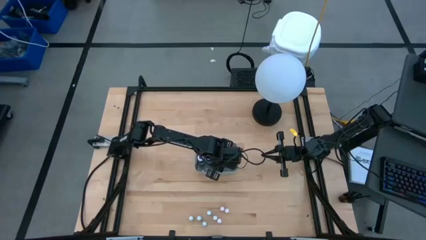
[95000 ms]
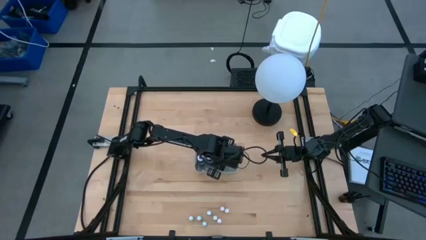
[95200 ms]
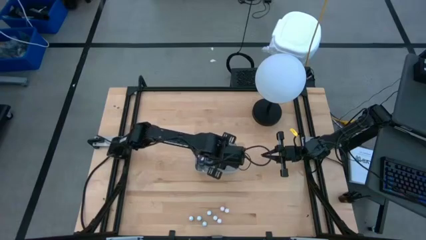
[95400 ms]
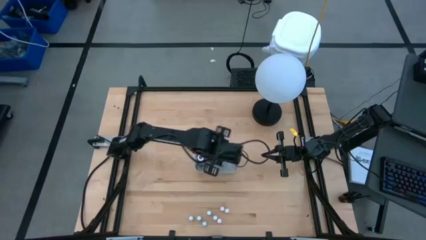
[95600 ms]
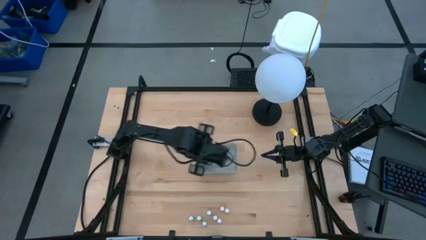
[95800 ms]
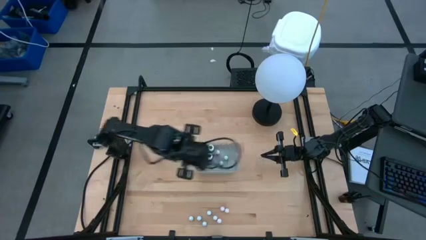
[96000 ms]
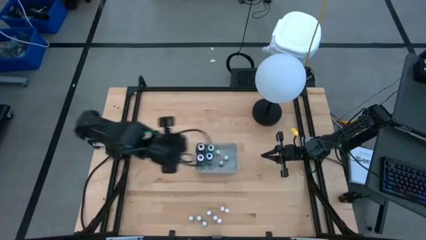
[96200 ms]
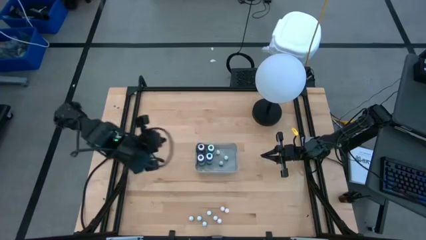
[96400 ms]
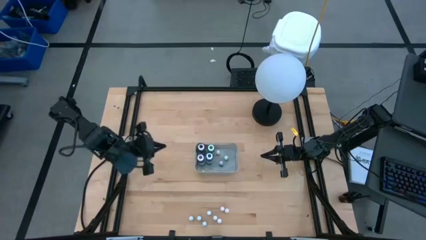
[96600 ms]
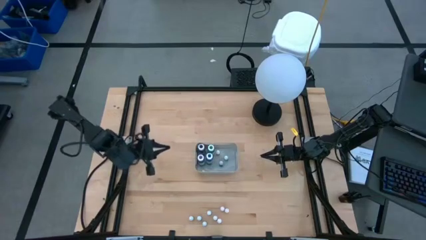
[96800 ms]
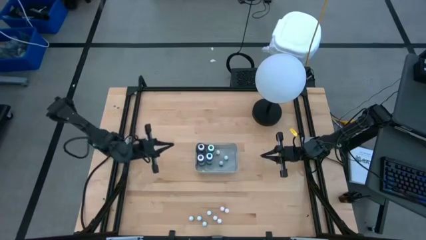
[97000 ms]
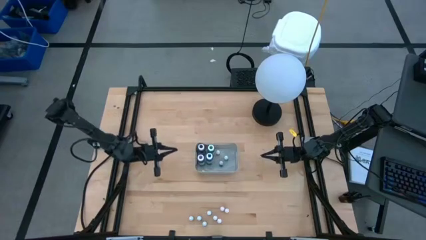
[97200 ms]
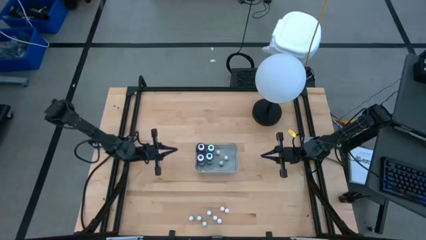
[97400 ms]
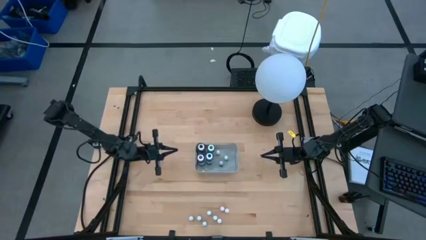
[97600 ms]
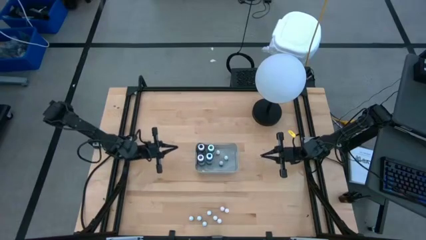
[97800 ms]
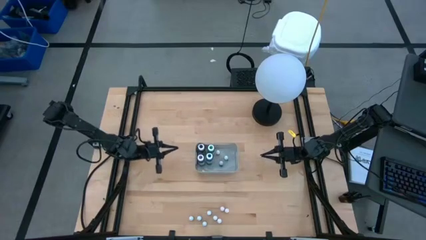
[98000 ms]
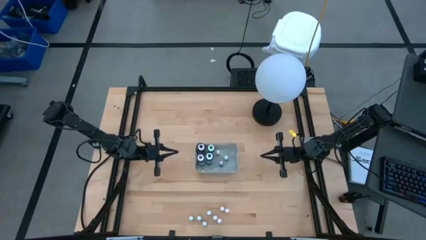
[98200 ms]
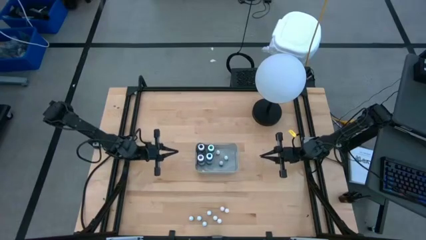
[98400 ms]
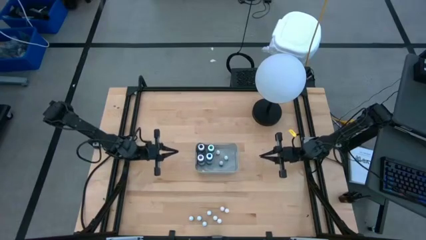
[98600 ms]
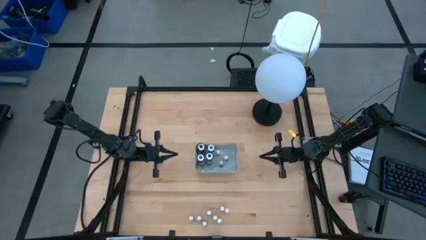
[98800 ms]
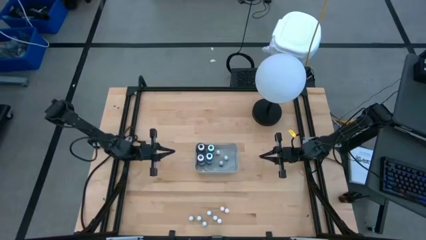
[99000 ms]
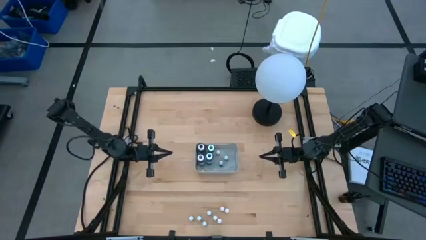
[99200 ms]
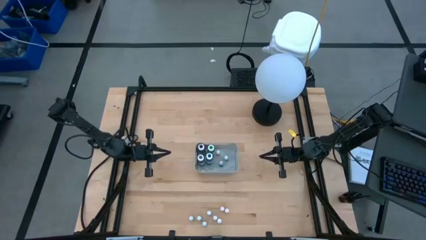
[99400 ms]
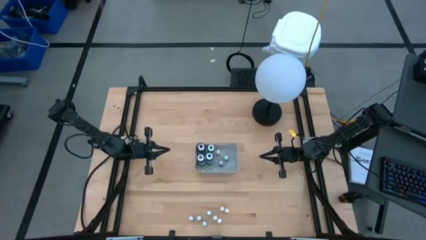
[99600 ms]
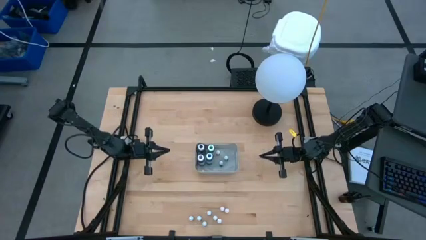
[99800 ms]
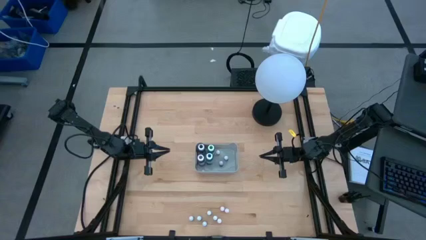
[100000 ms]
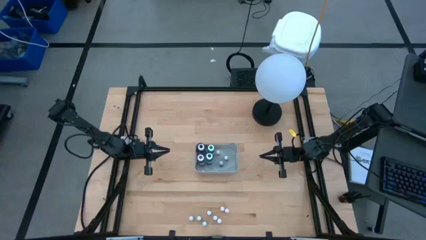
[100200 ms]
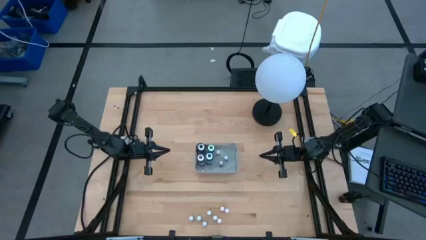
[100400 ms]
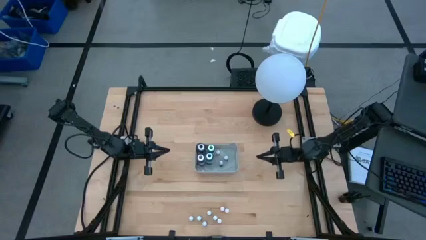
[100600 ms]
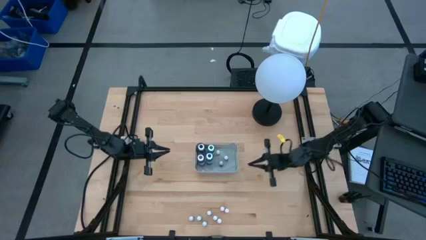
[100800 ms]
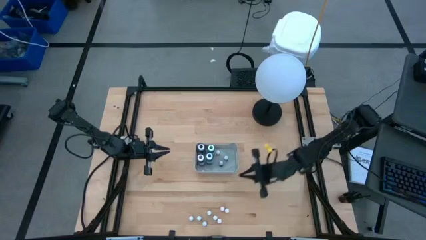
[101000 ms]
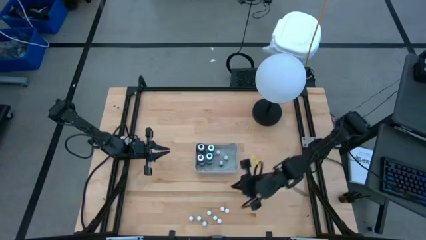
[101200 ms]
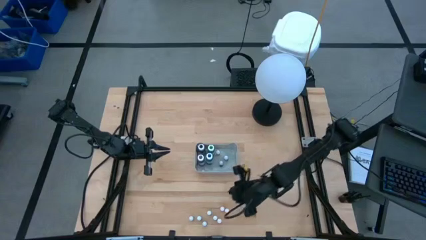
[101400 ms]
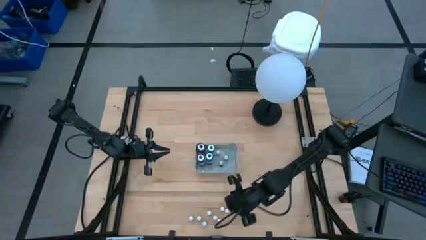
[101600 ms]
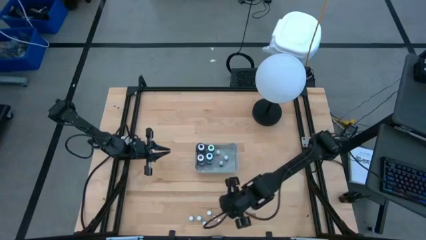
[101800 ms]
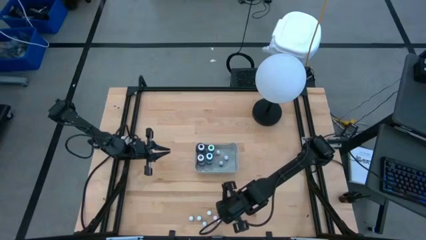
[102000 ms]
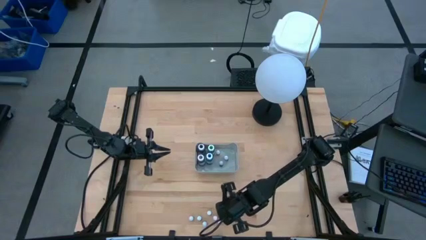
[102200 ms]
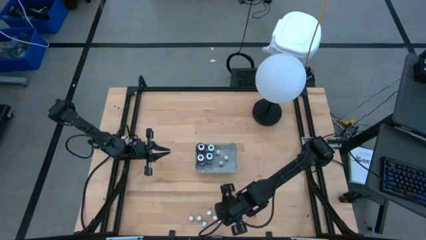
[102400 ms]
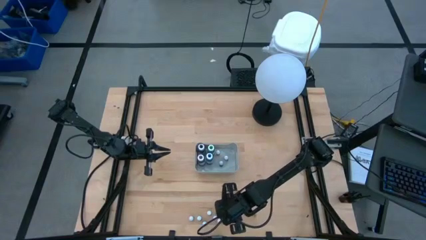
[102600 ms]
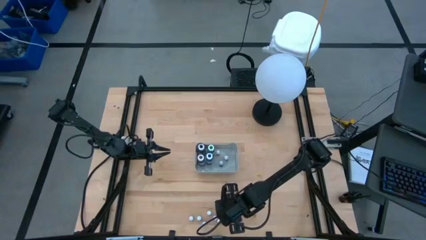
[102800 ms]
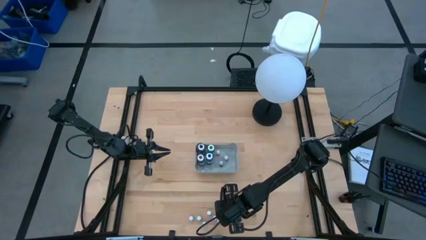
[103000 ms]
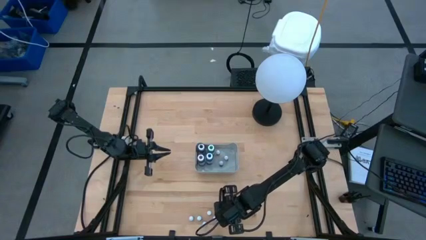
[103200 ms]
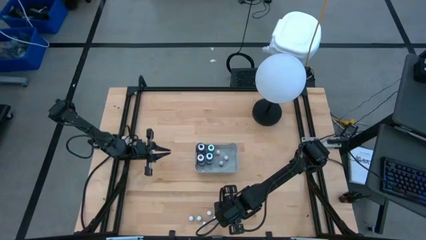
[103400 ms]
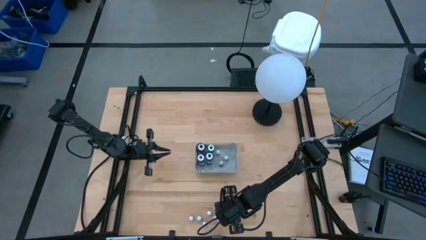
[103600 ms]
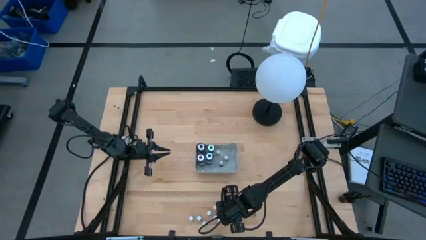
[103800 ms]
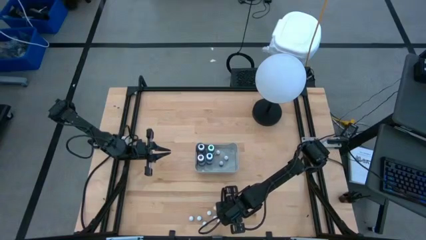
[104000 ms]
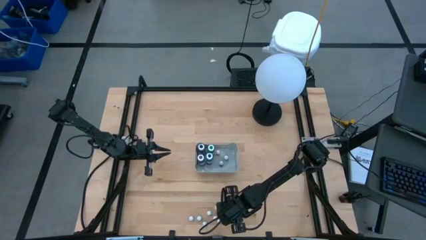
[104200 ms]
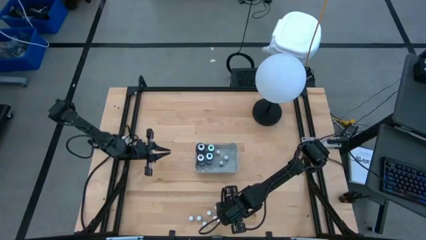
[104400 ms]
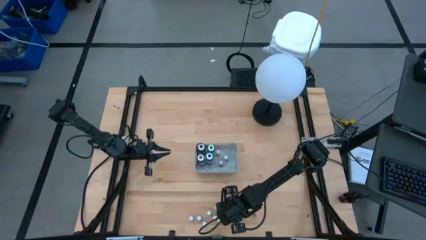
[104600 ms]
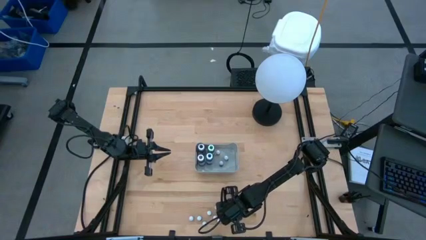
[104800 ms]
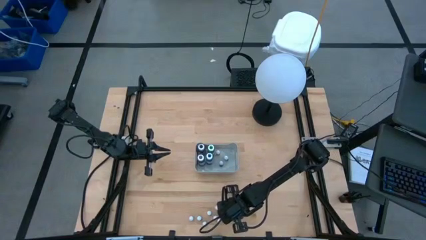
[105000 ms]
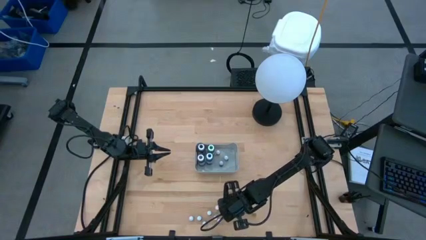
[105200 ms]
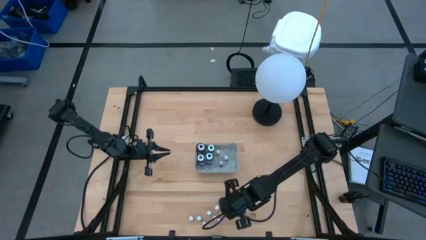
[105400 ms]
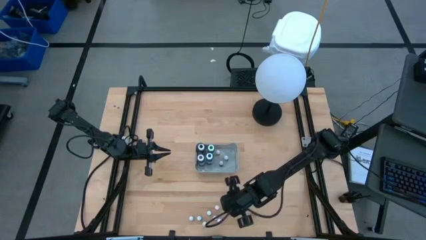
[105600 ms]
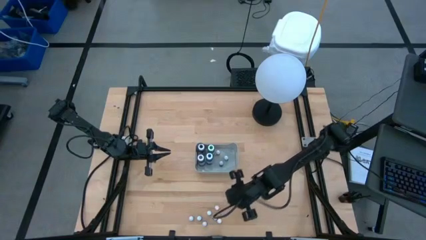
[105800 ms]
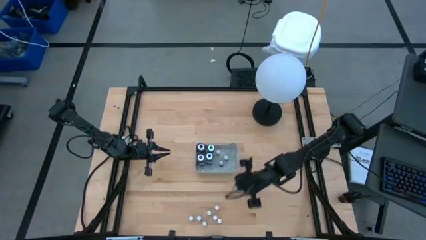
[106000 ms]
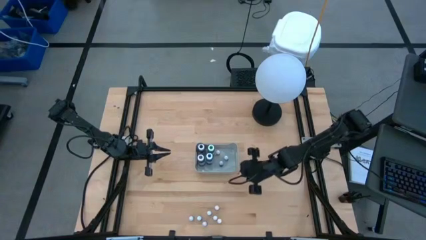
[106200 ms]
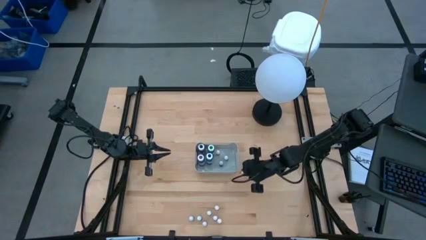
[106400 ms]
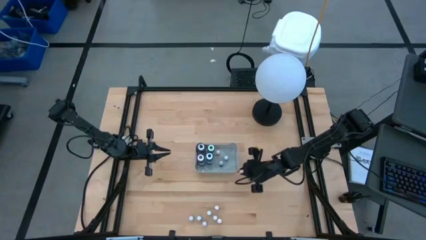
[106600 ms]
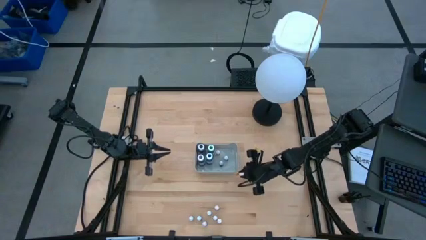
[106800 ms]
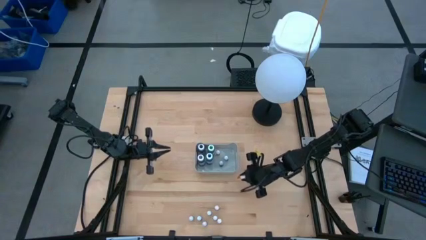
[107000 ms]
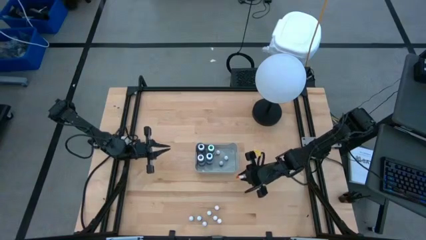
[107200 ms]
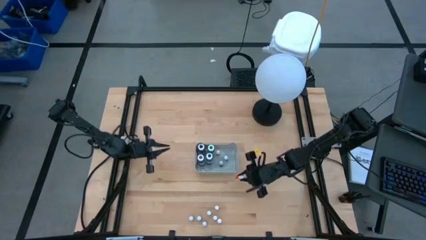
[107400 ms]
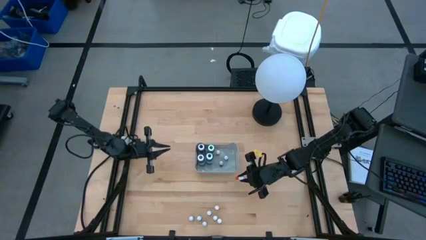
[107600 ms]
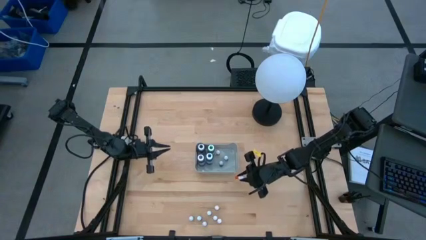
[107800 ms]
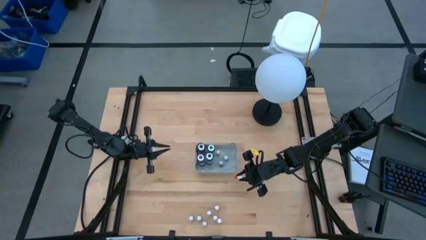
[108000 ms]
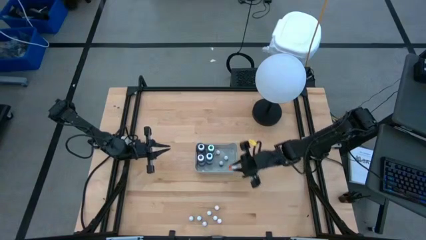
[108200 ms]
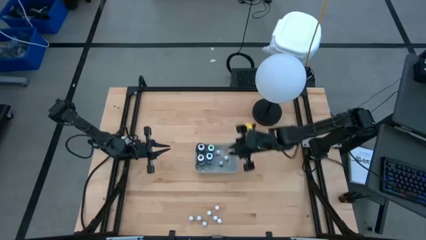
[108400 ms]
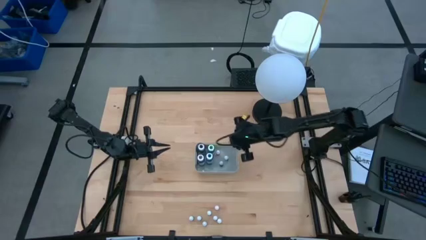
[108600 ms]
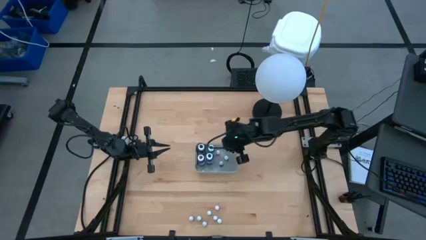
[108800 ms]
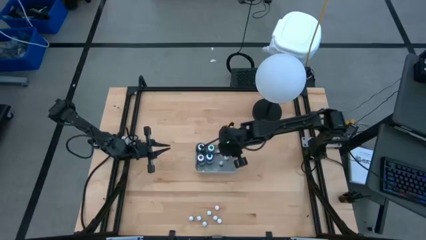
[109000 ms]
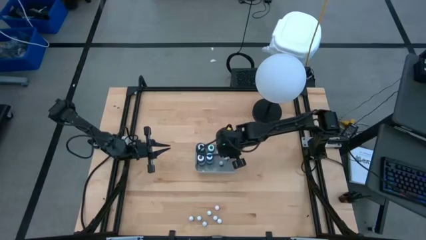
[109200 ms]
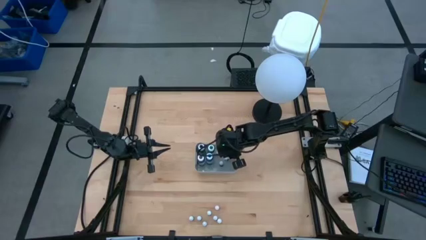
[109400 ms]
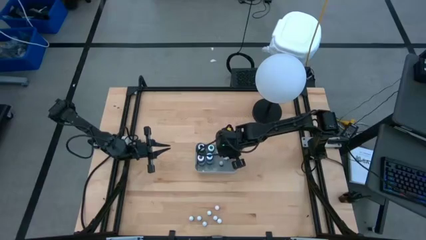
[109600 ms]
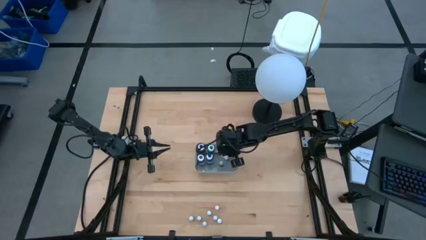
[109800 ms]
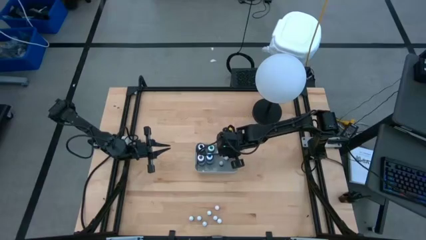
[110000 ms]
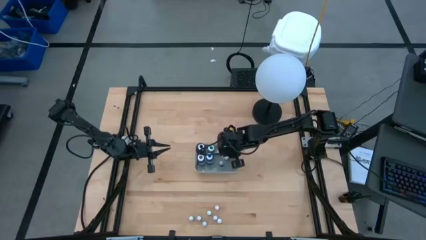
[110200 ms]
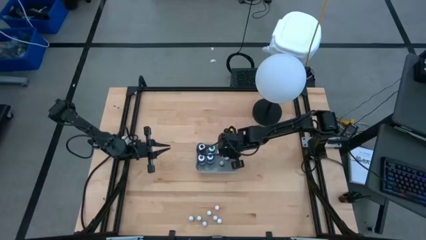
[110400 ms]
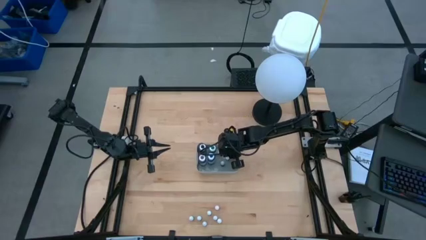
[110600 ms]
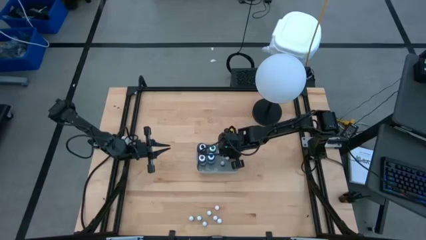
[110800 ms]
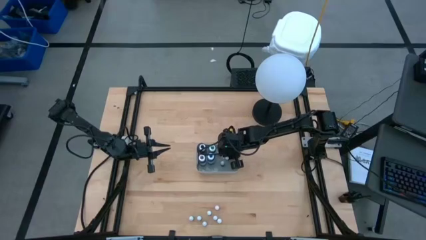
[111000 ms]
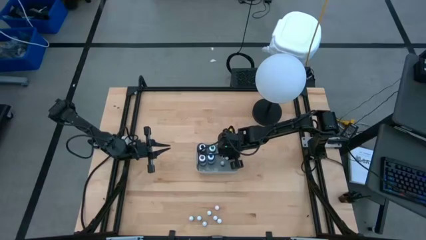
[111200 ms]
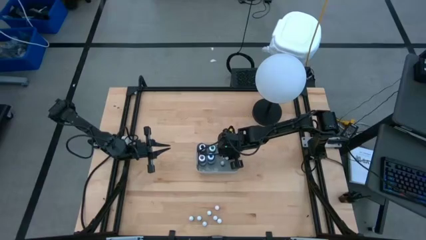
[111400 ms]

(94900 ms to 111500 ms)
Task: Pick & Place food coloring
Put the small orange food coloring bottle into the gray bin
